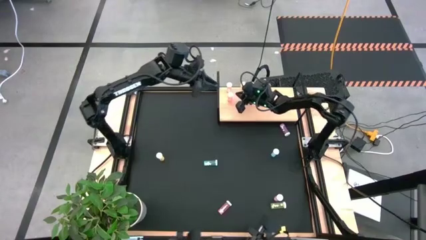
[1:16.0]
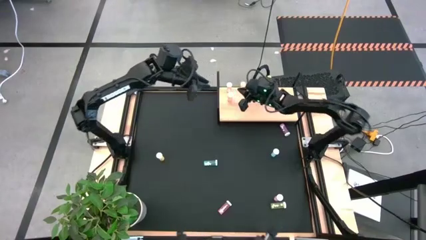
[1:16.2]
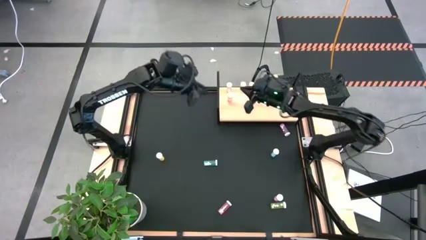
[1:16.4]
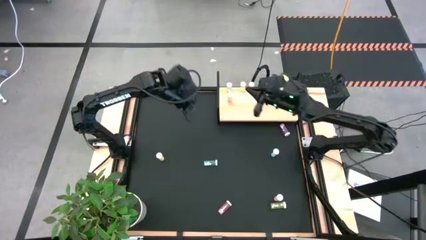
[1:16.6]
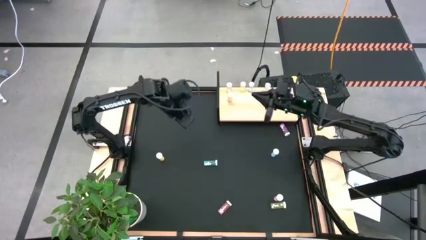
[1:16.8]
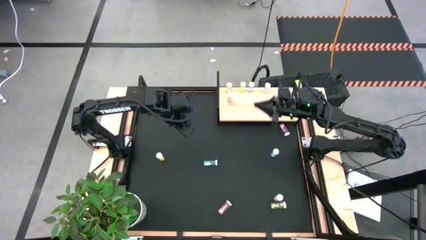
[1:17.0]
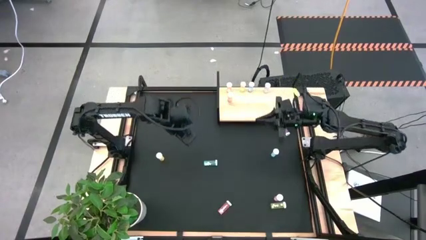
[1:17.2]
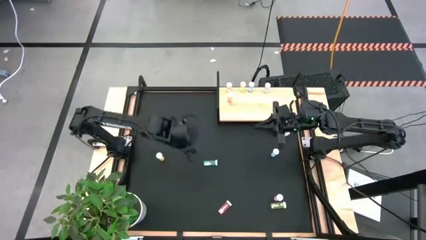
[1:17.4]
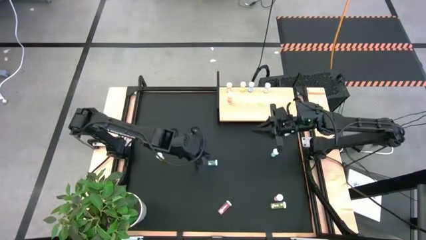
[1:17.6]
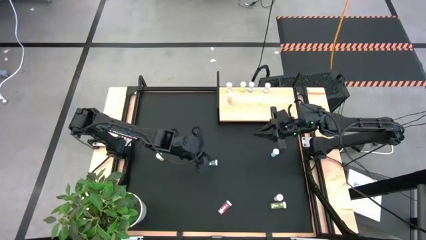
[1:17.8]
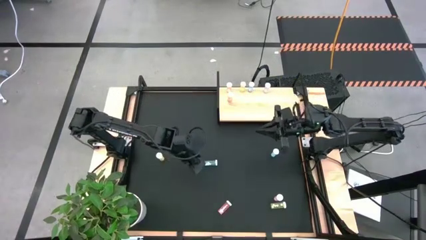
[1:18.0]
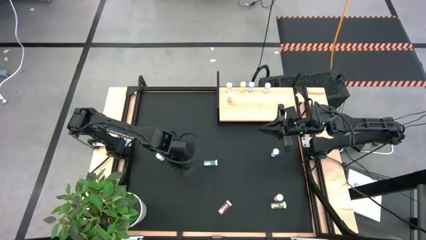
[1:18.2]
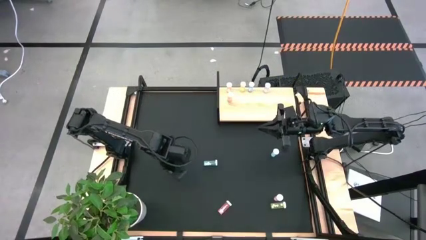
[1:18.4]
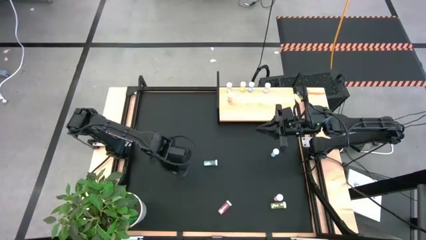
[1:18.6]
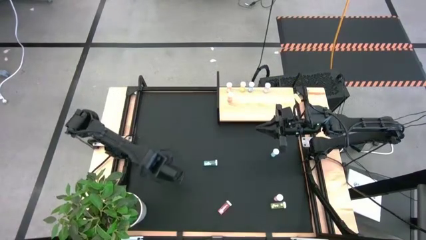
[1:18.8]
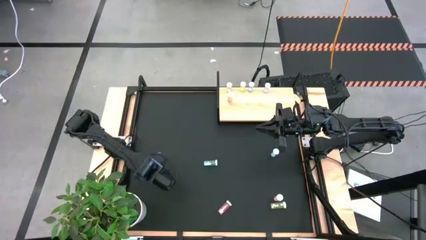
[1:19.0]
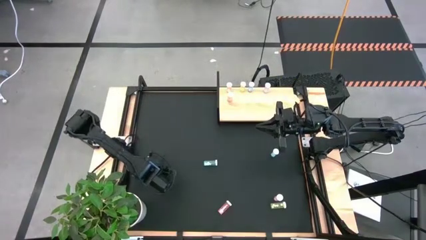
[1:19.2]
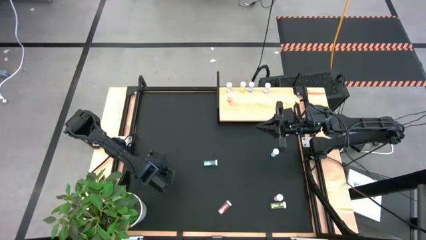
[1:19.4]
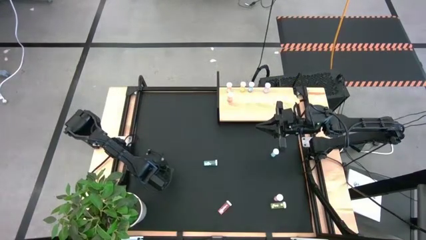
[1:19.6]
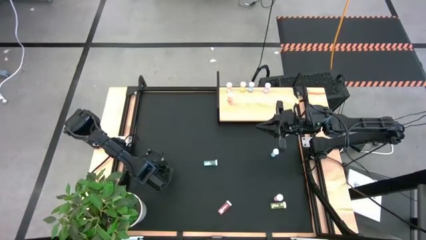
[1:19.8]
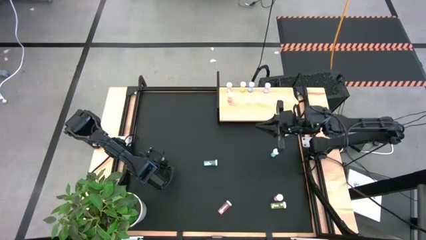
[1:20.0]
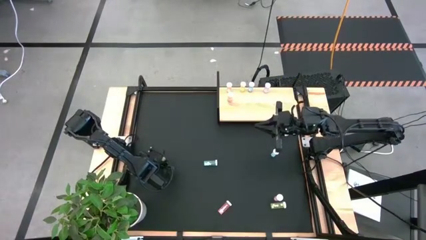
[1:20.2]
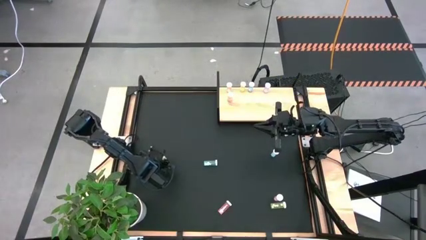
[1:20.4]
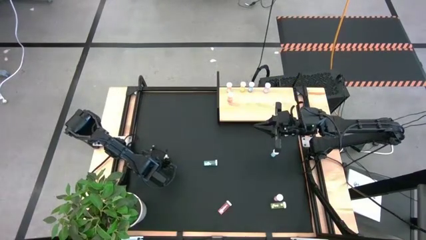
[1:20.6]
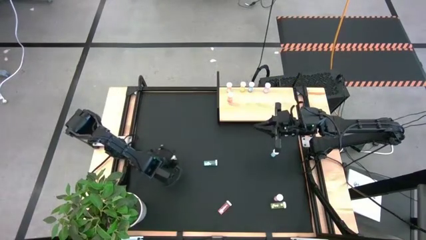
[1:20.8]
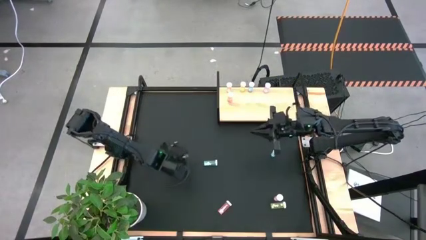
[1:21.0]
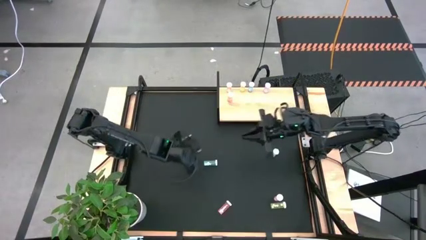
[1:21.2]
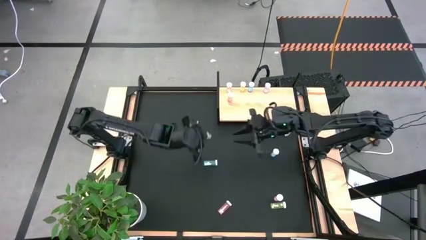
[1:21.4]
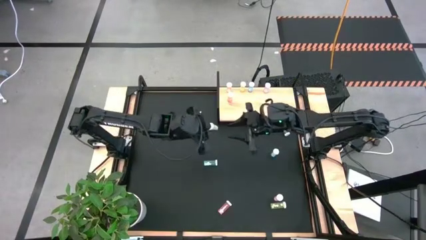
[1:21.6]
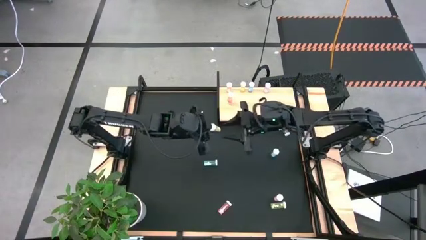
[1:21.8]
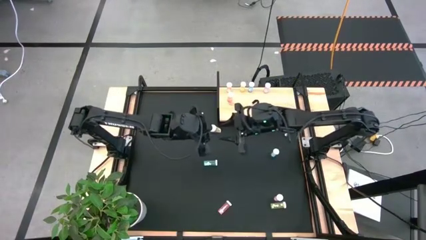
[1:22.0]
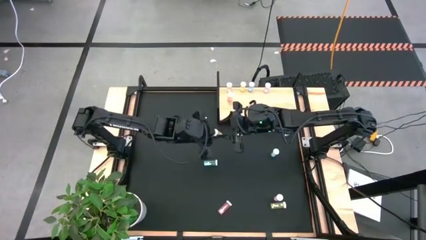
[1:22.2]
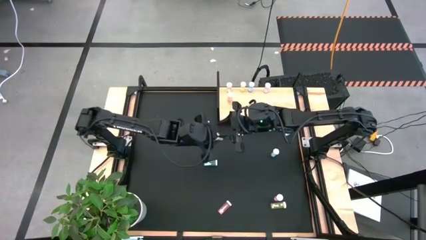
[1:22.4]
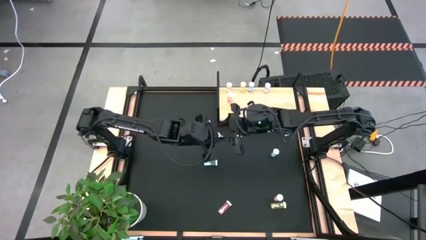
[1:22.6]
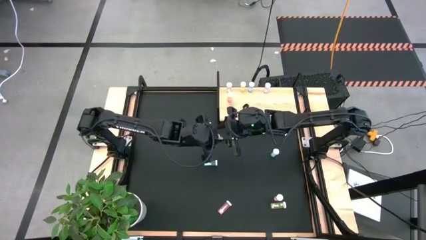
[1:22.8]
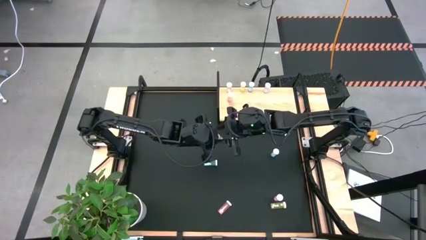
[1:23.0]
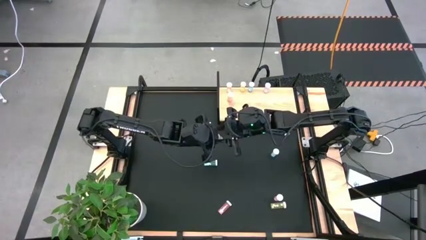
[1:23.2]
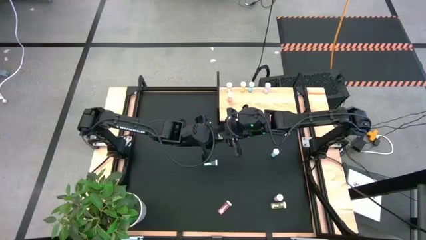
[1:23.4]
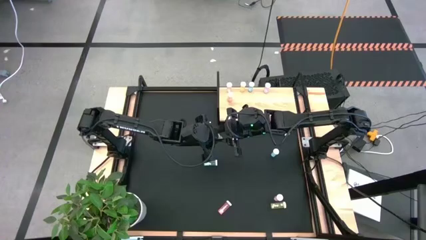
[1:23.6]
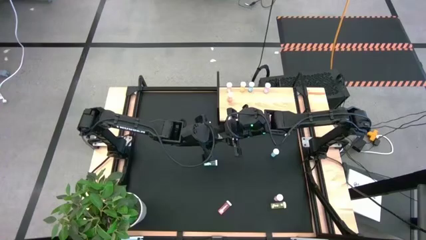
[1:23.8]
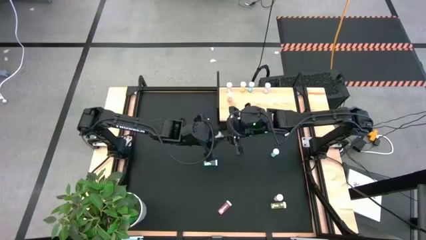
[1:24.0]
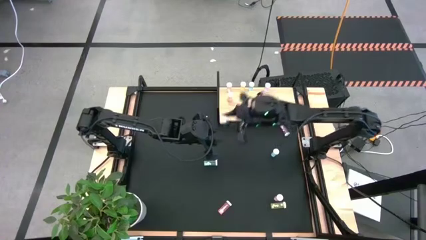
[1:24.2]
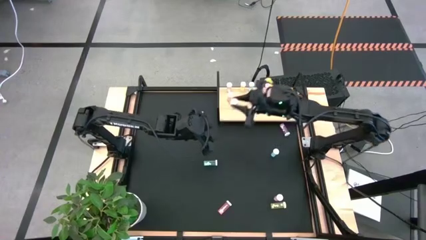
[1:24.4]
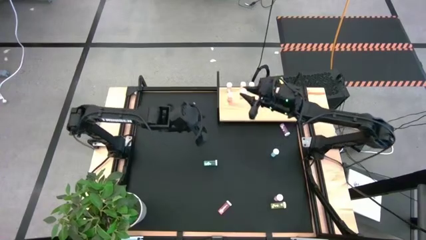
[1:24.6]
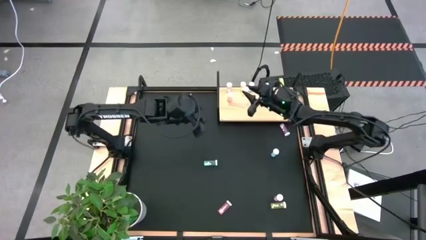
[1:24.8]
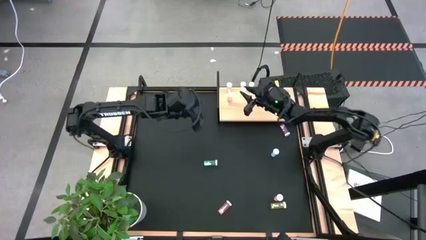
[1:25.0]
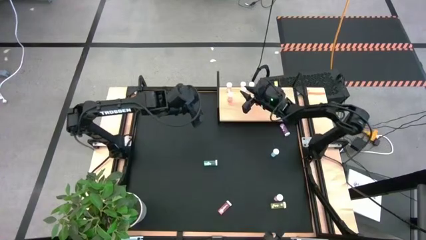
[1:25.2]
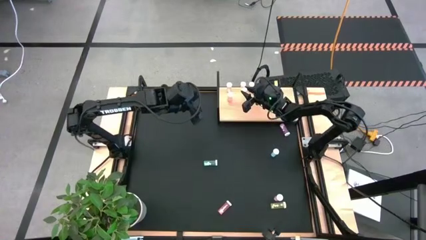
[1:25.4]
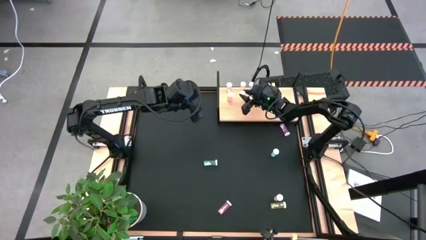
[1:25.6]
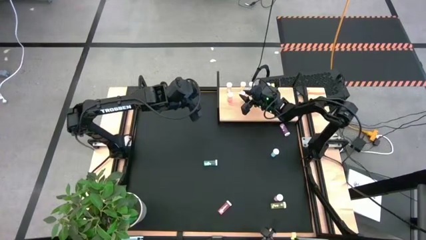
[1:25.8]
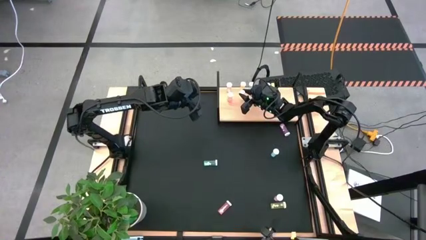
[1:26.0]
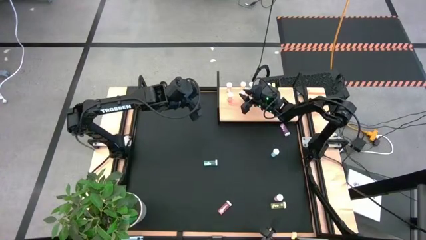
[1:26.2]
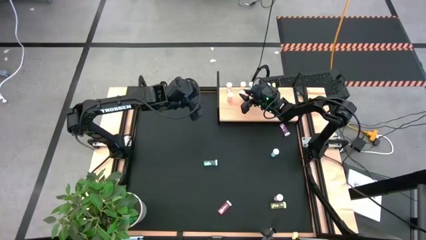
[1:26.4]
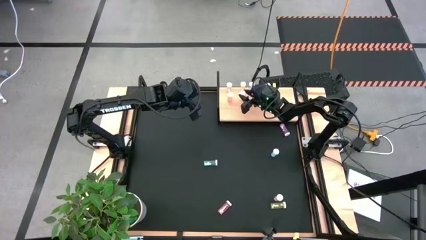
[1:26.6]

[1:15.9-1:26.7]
Task: Pick and place medicine bottles onto shelf by color
Put the top yellow pill bottle aligned with the other yellow pill bottle on the shelf

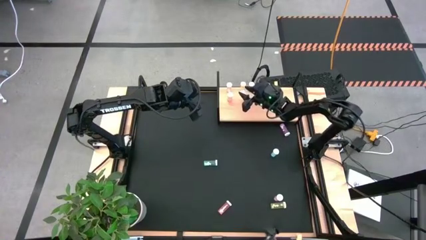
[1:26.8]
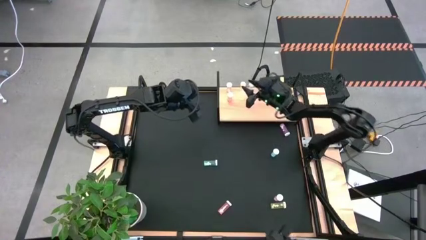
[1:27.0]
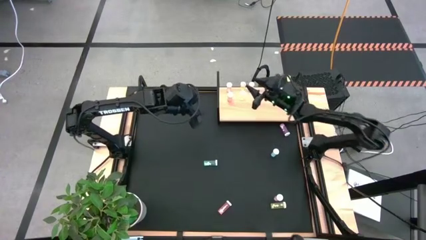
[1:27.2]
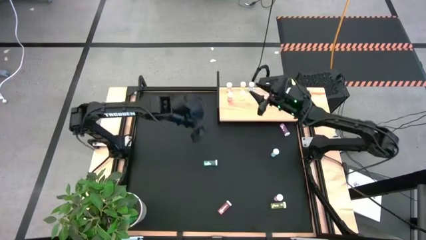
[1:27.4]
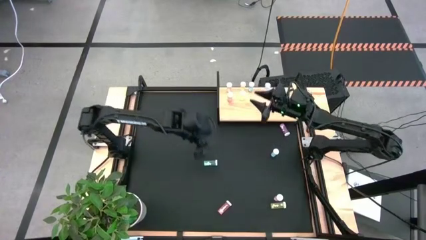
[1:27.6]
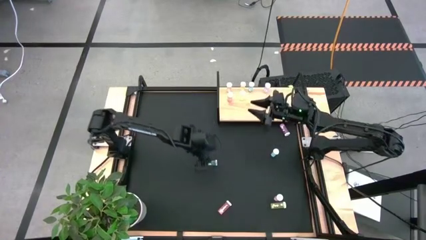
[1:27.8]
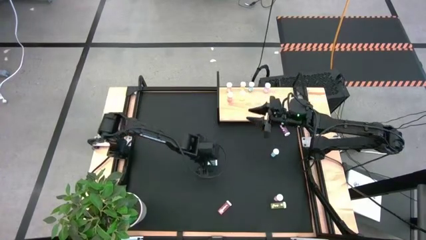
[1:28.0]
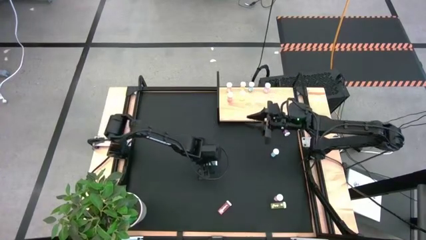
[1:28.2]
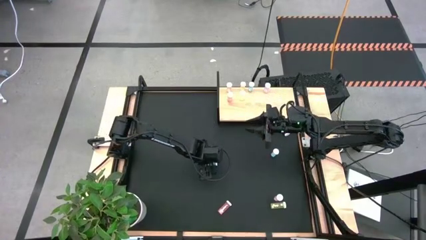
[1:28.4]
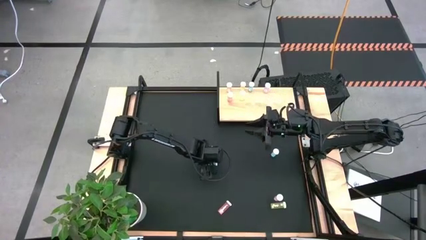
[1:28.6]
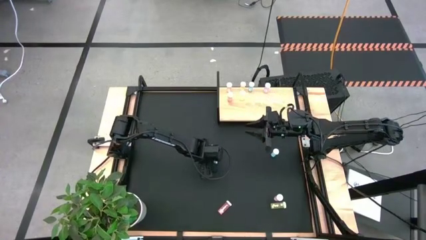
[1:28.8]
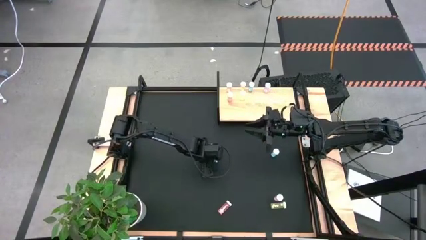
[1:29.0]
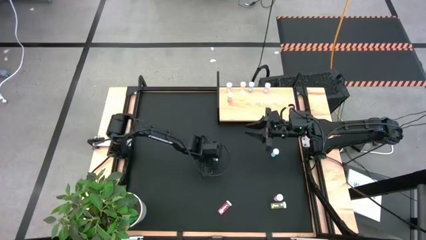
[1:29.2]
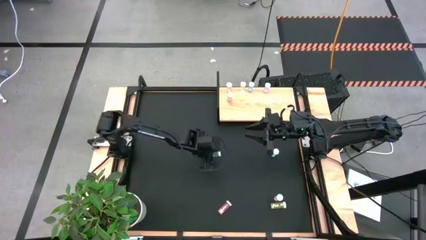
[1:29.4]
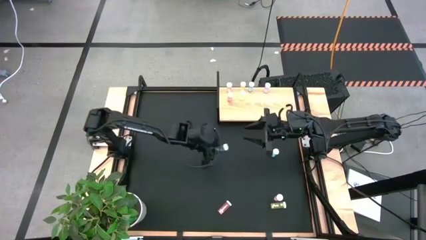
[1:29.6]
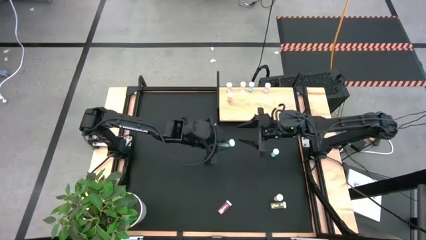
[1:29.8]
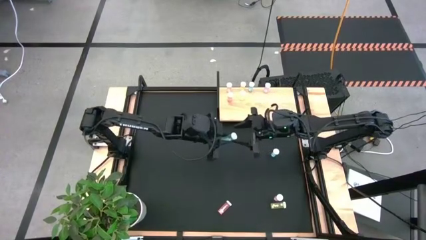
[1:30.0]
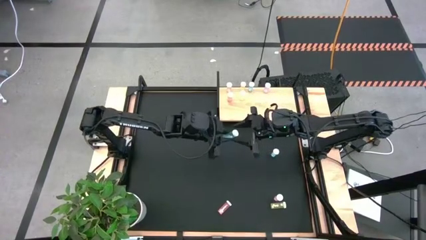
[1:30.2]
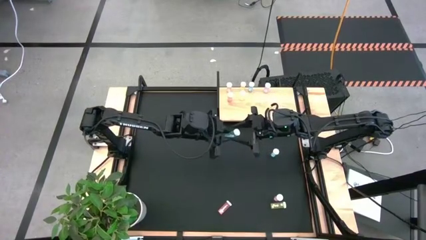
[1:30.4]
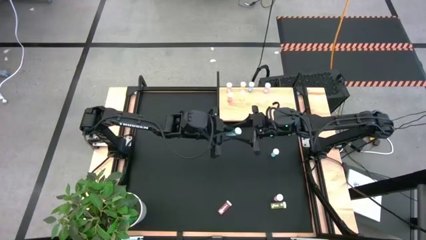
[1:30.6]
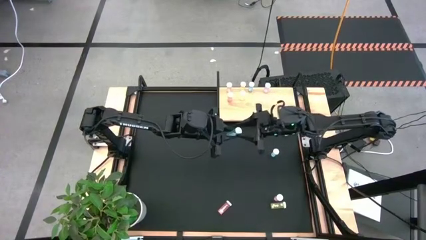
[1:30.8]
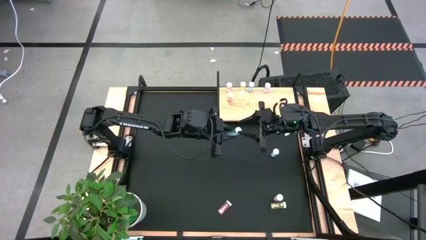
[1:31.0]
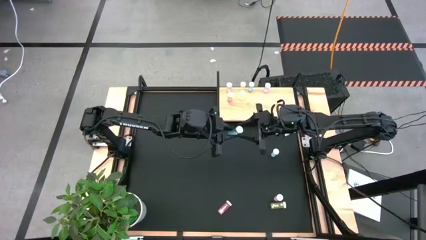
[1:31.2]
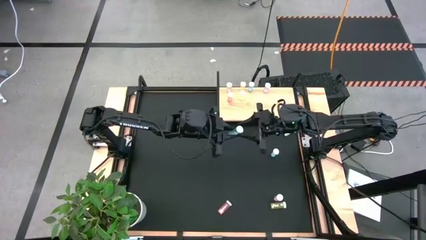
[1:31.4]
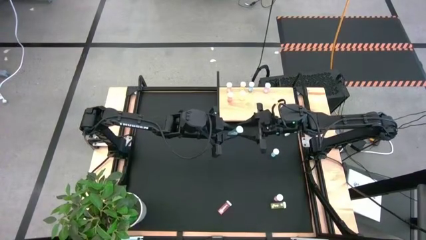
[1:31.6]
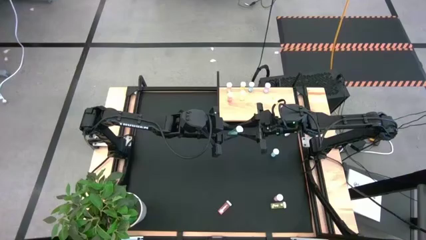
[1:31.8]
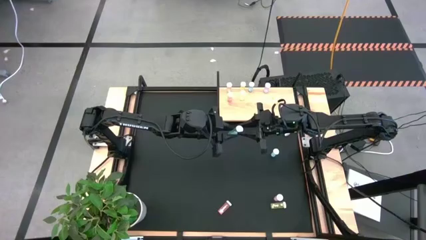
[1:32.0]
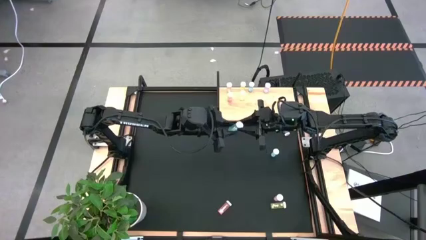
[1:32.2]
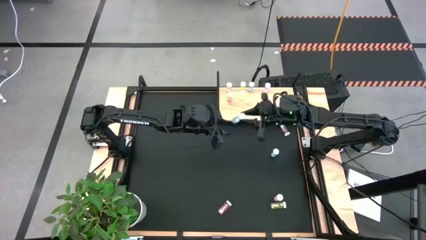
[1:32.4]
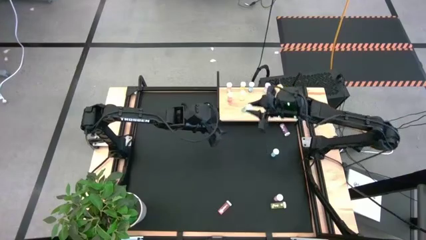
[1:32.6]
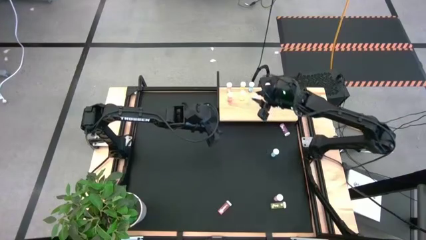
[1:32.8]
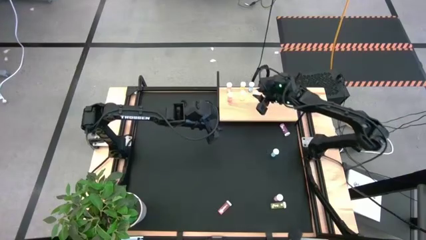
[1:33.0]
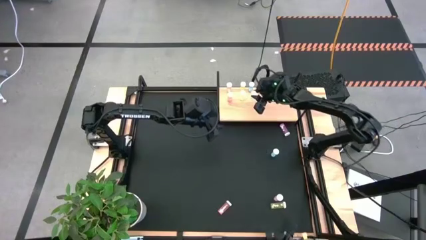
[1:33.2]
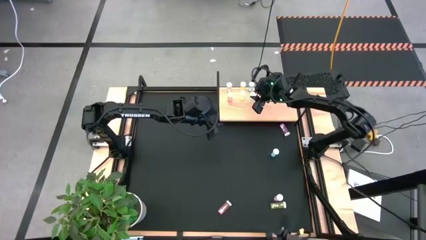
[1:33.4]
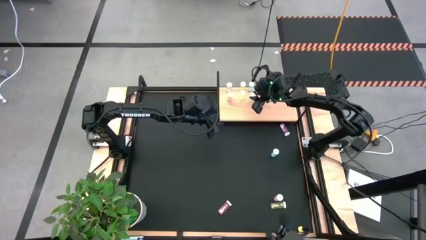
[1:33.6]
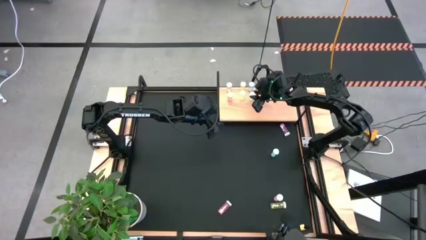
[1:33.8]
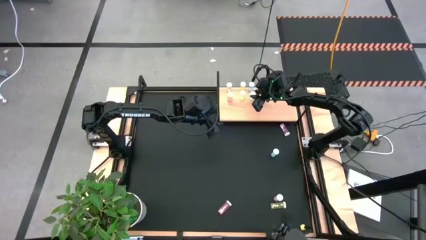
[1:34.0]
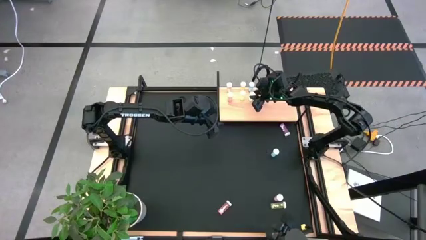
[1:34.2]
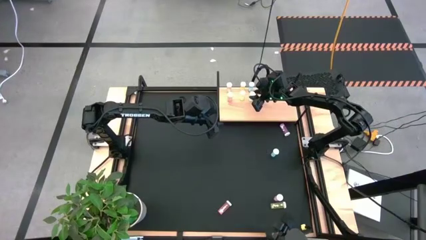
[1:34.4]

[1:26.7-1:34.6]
Put the left blue pill bottle aligned with the other blue pill bottle on the shelf
